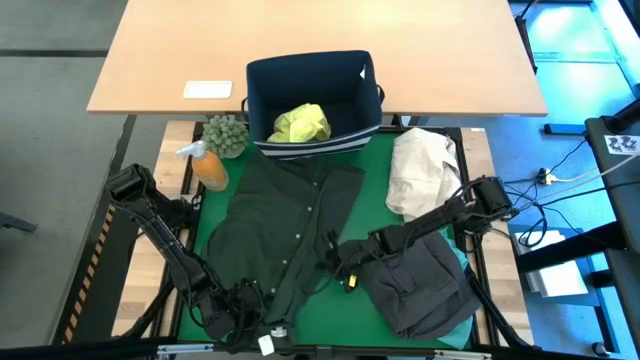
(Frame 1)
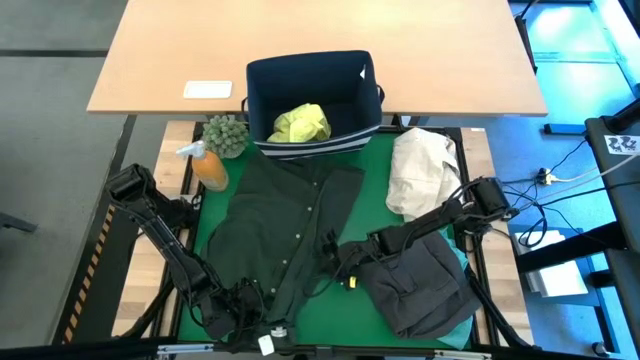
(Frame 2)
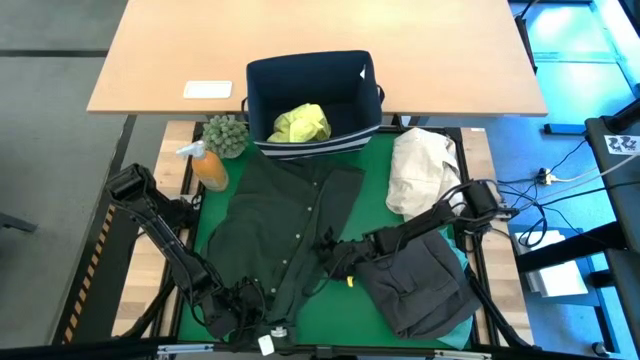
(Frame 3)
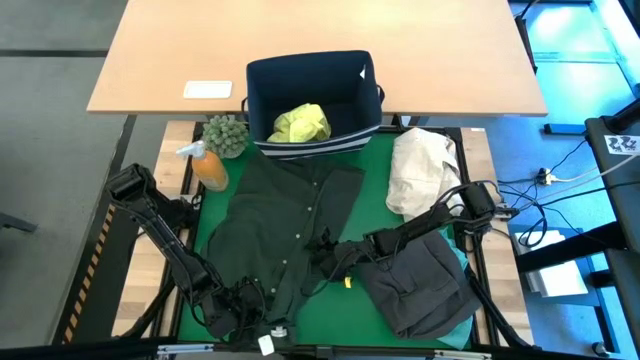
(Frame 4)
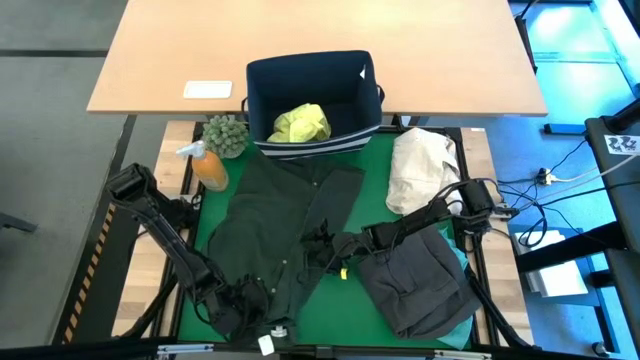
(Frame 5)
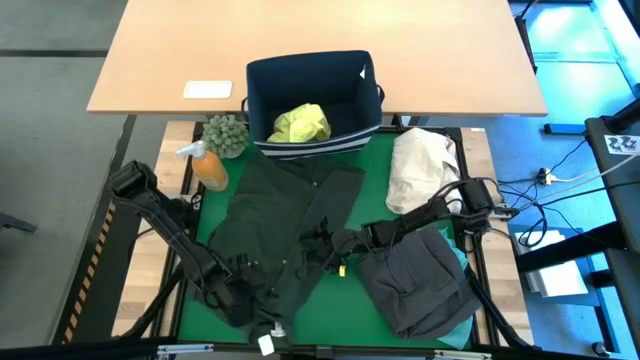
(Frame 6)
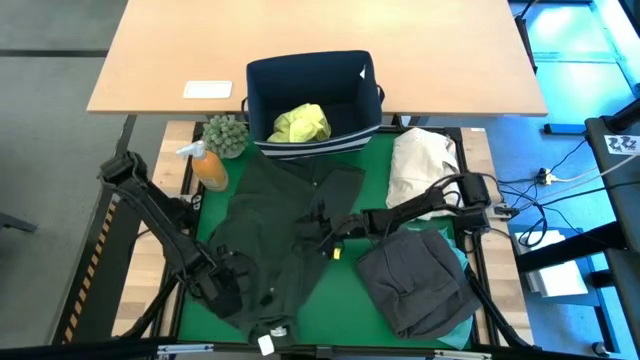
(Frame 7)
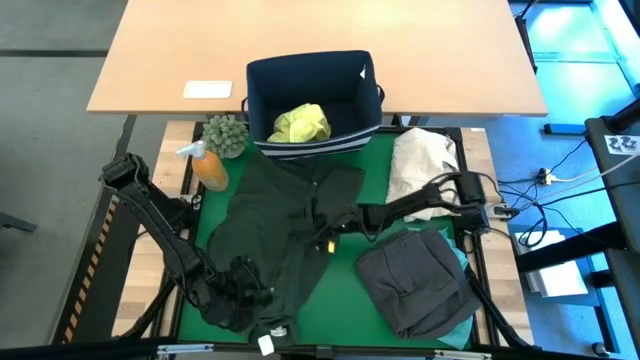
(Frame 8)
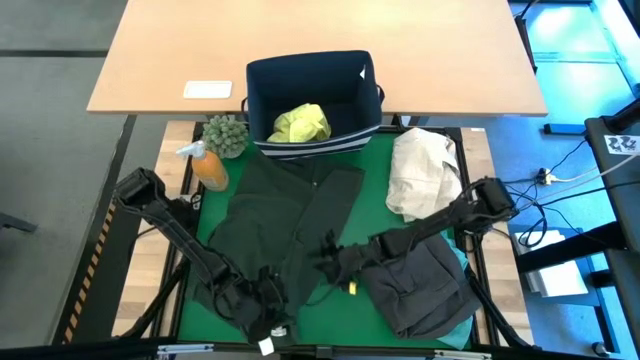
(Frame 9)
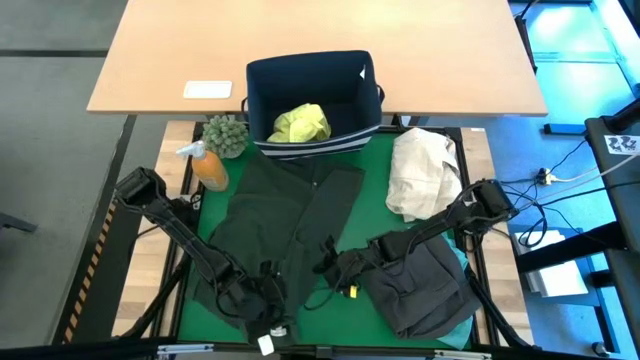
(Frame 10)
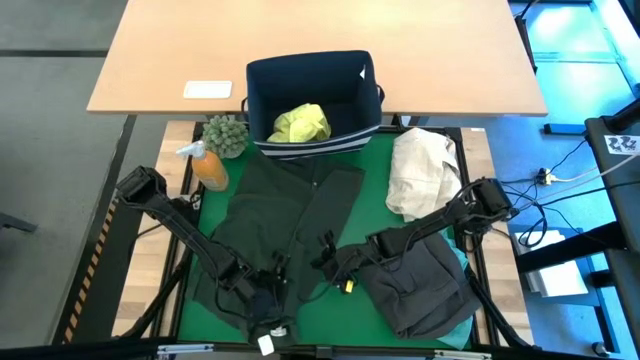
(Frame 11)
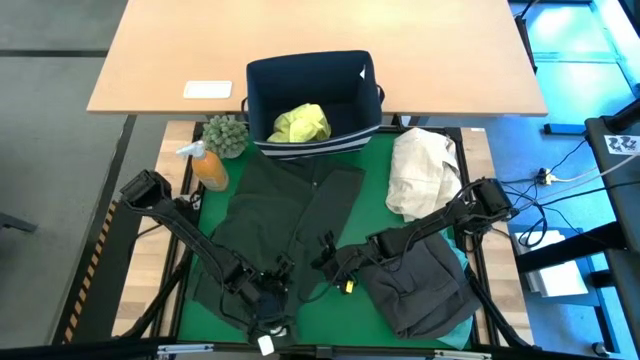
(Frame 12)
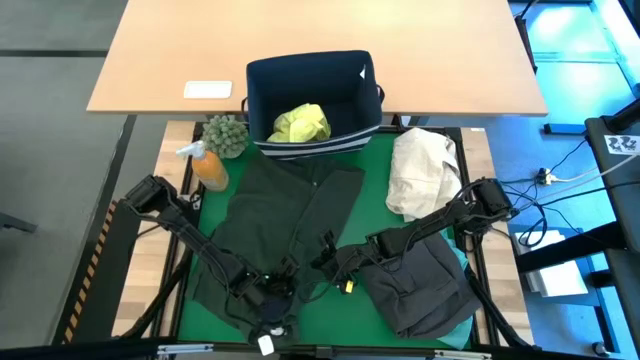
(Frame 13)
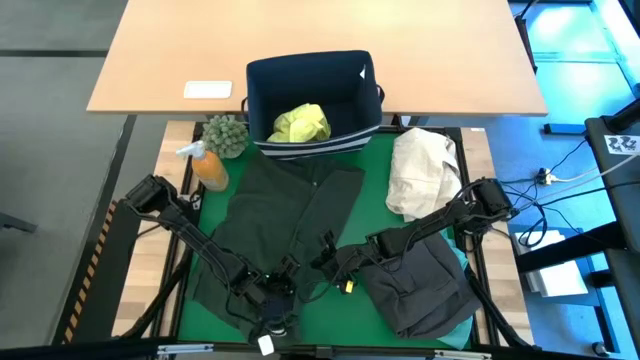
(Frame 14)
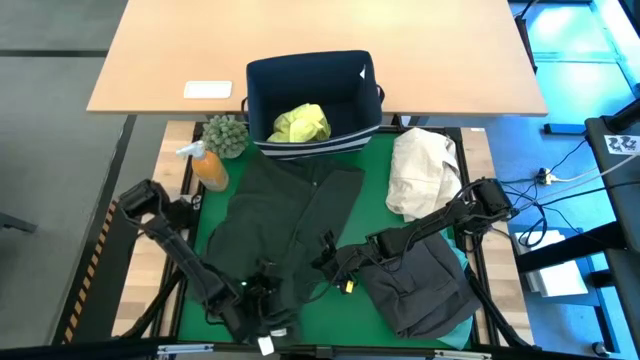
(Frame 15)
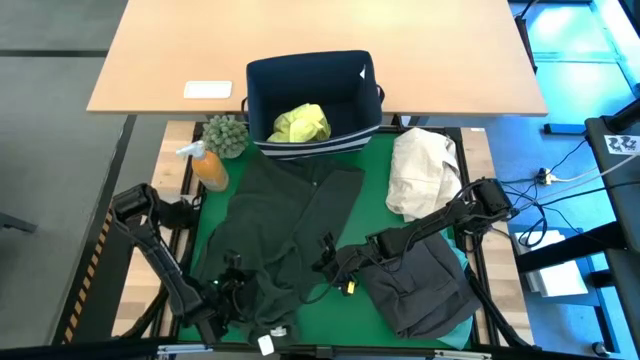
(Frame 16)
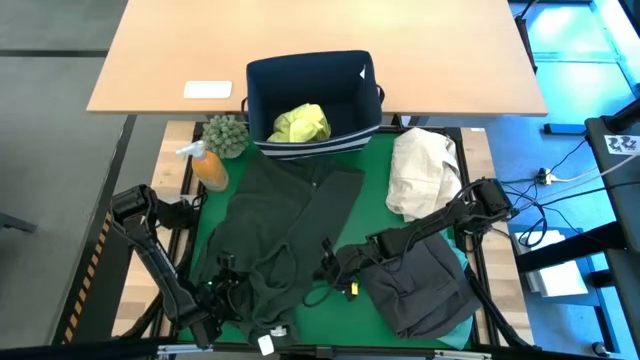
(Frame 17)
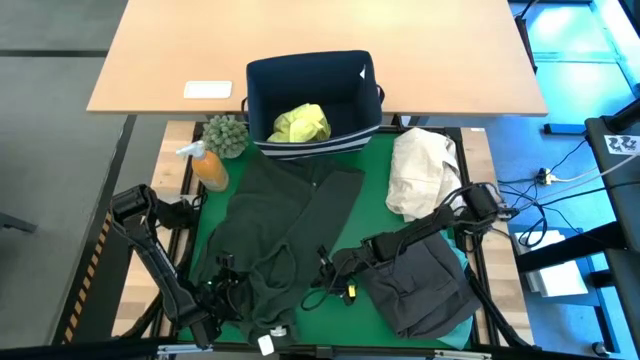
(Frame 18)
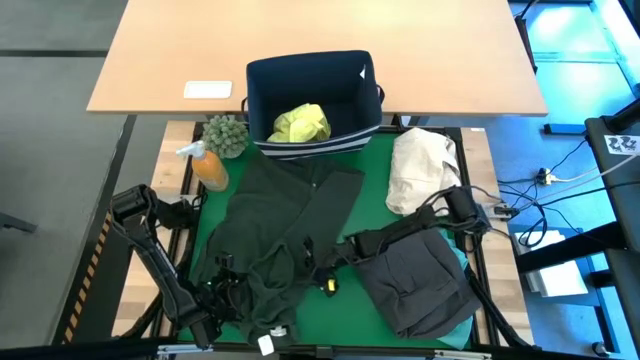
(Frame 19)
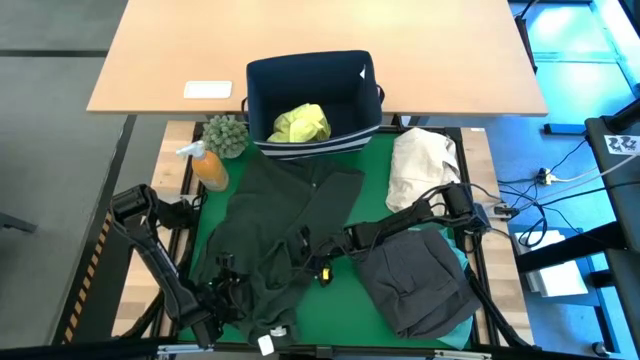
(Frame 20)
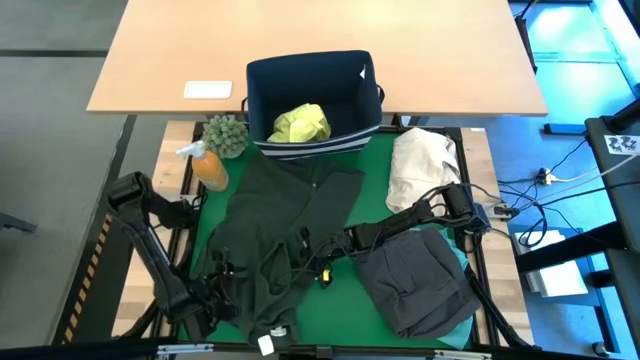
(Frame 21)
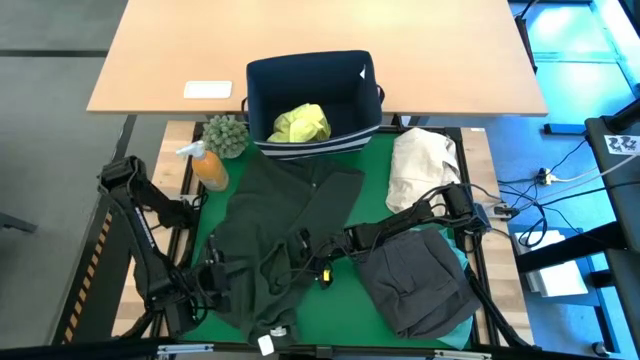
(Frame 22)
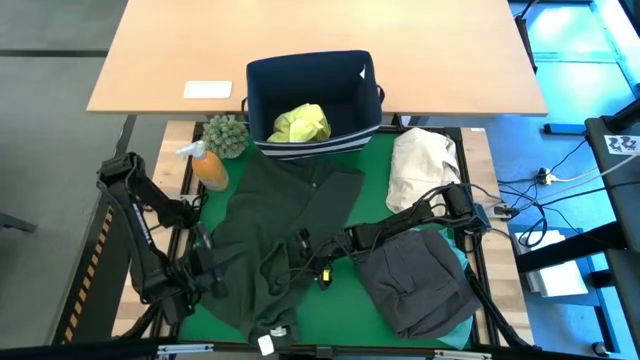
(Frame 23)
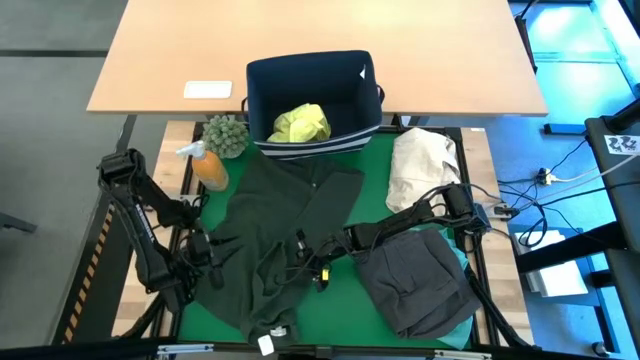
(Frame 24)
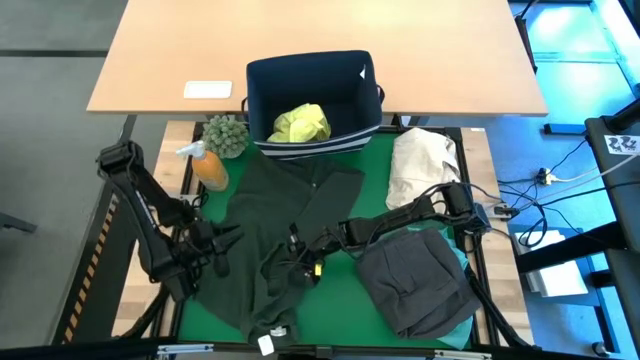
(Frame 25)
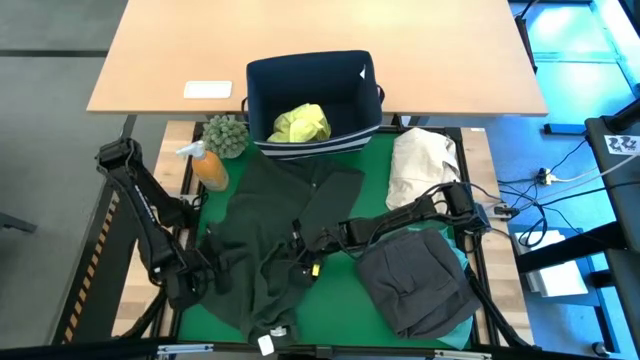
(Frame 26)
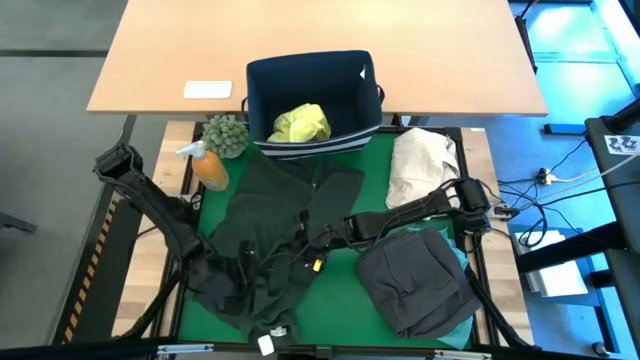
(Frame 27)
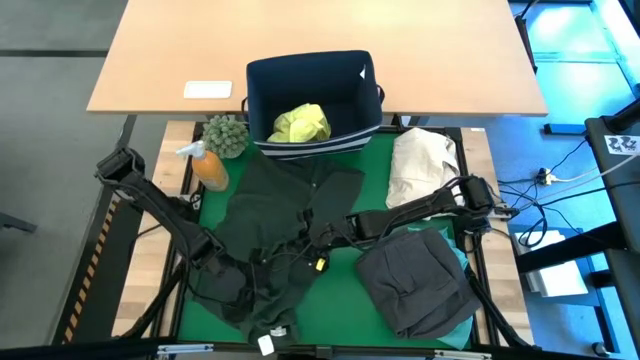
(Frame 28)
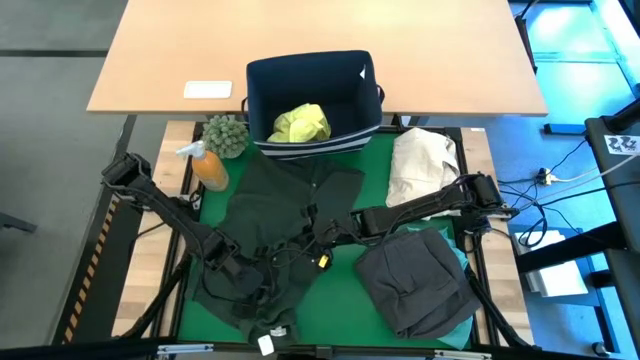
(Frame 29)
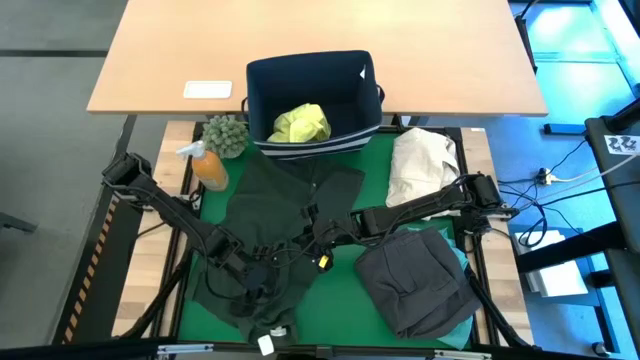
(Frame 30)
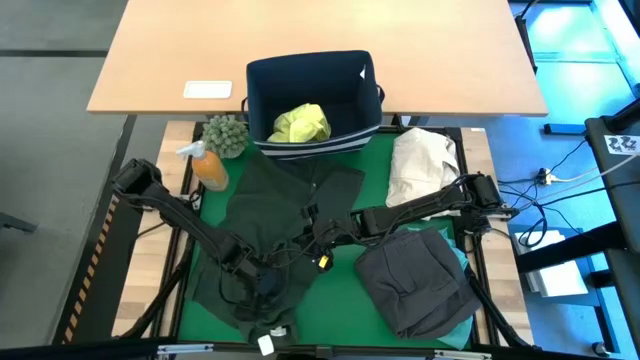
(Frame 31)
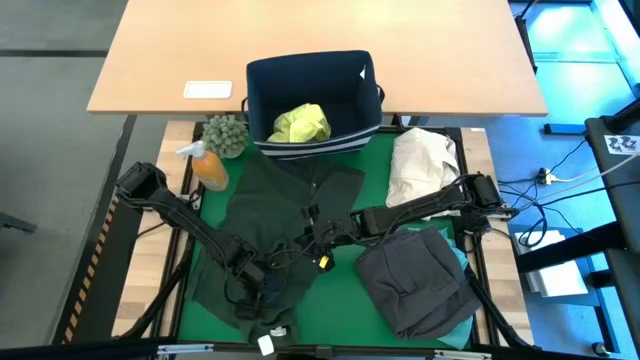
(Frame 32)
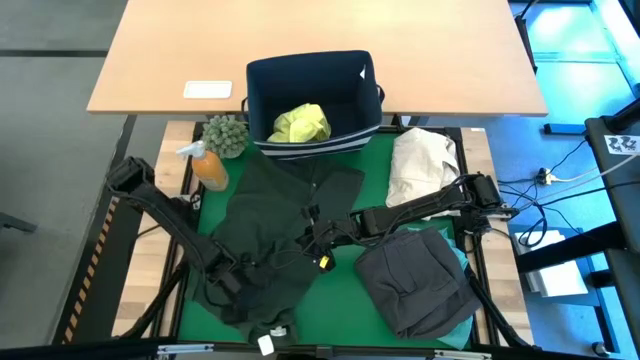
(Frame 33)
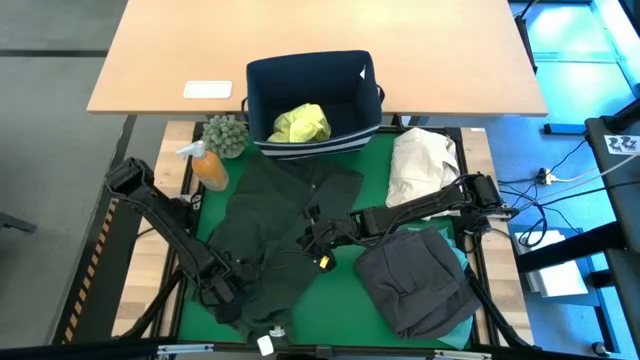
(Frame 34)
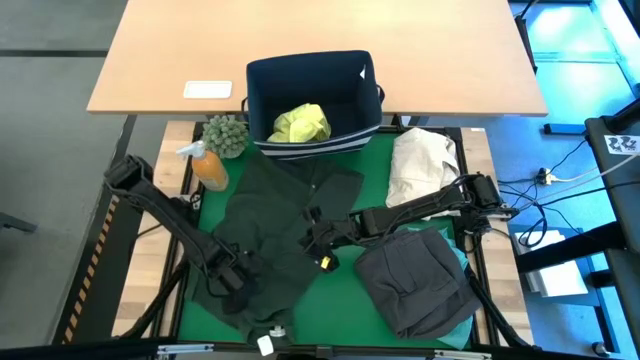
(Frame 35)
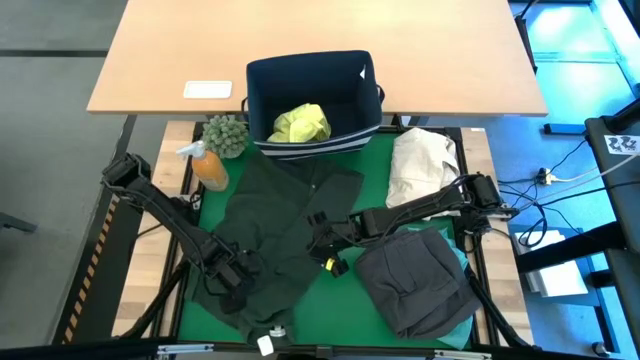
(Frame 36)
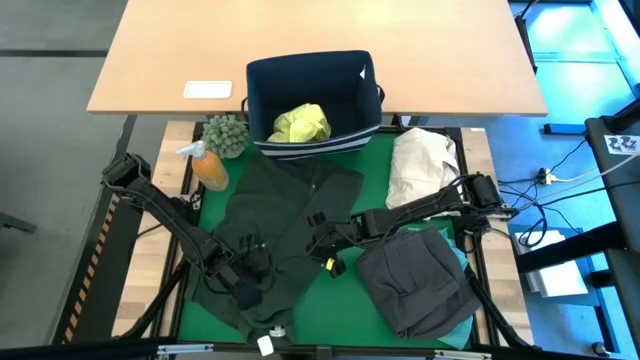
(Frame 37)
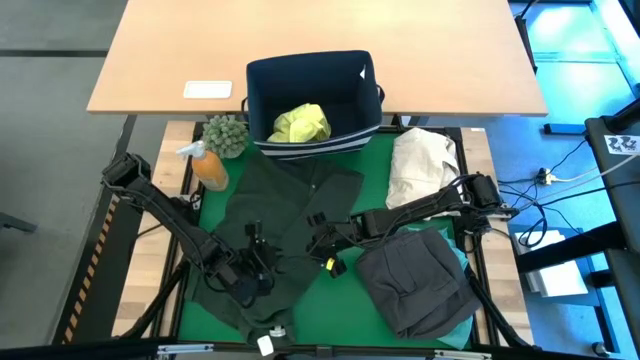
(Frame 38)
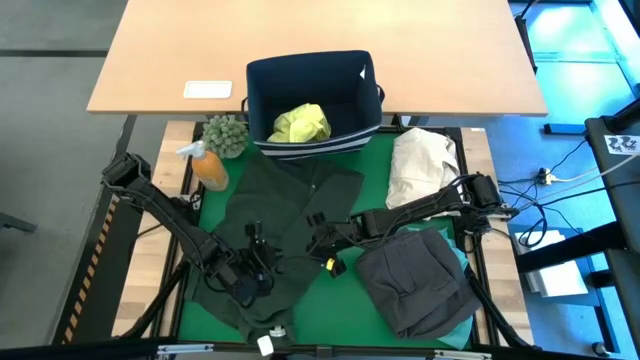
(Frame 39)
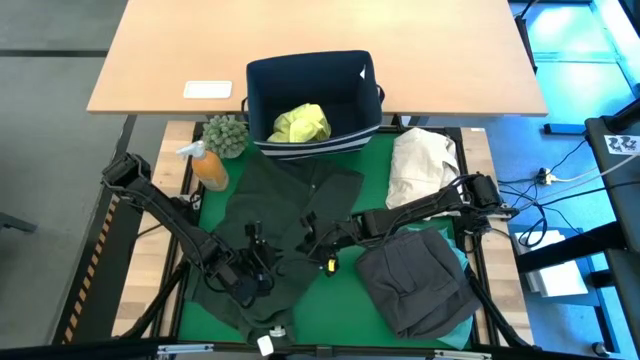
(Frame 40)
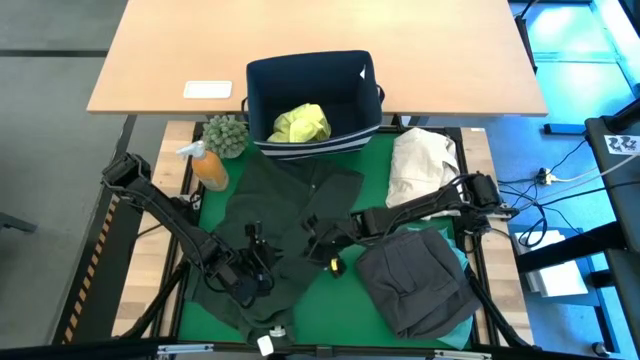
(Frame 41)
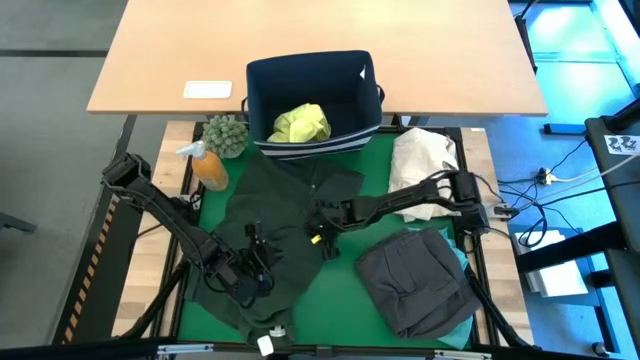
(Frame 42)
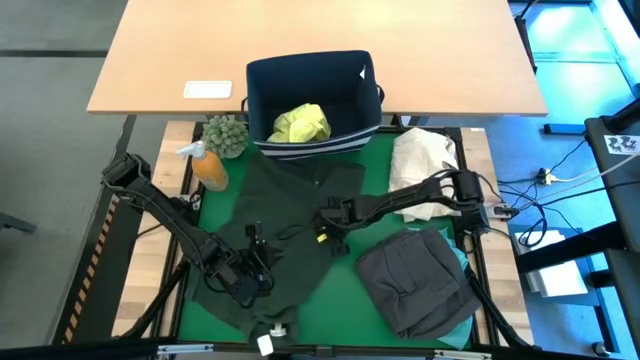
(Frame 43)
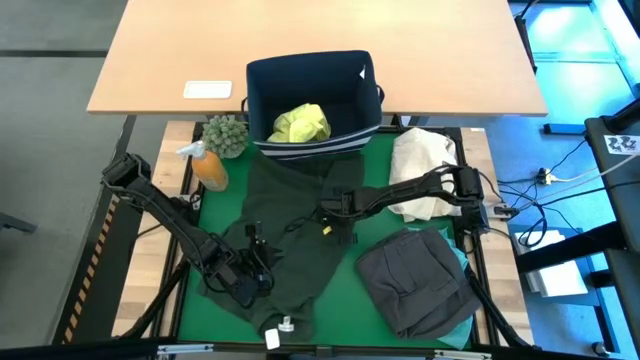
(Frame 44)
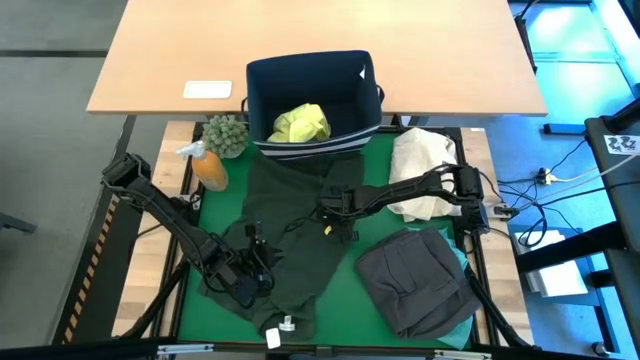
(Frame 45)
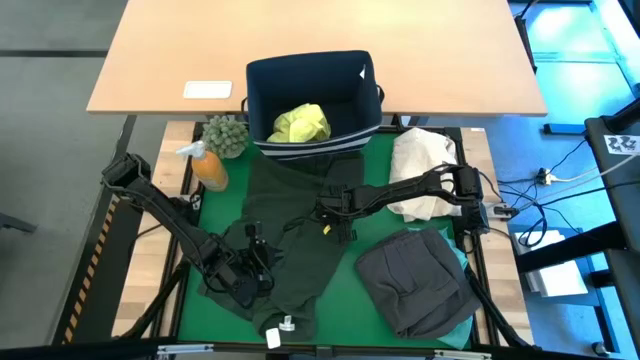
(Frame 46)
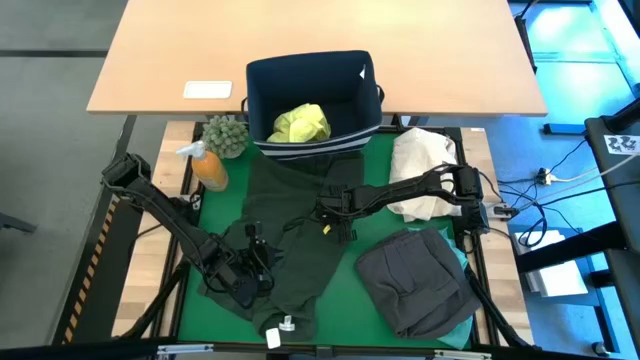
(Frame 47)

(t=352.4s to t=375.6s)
Task: Fold laundry
Fold the green polo shirt
